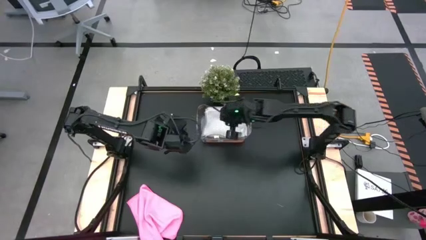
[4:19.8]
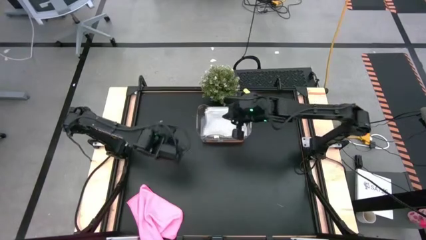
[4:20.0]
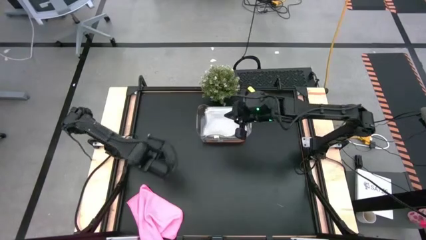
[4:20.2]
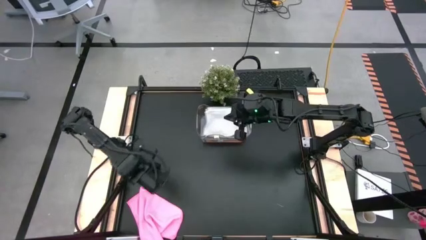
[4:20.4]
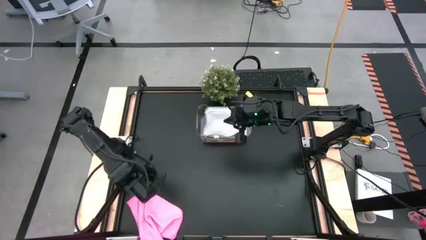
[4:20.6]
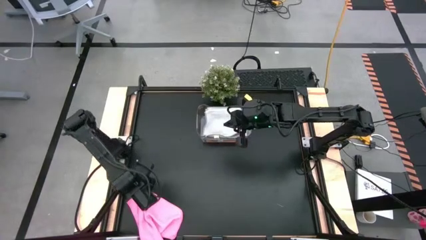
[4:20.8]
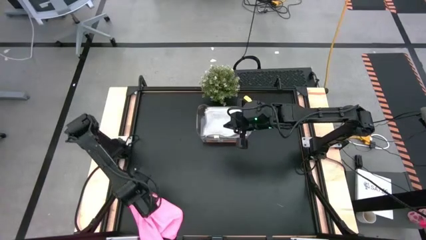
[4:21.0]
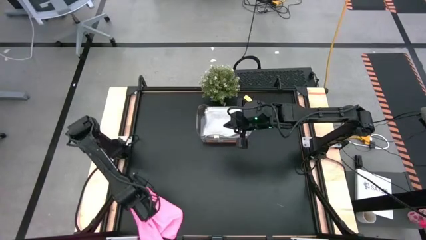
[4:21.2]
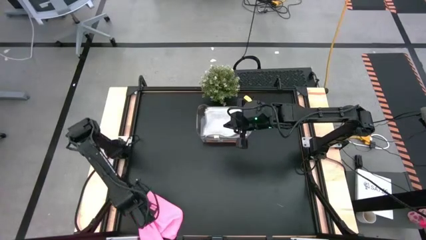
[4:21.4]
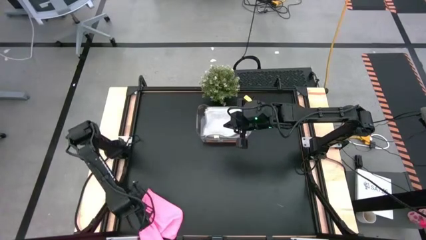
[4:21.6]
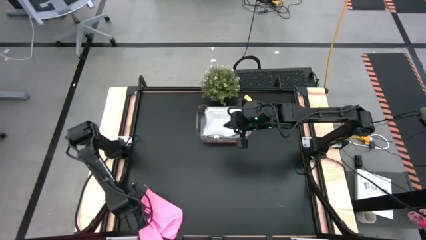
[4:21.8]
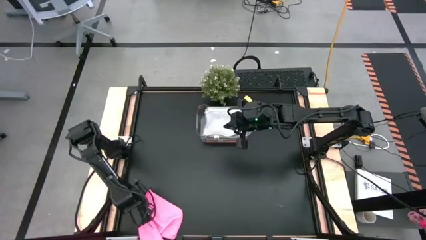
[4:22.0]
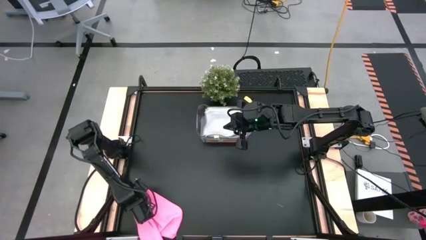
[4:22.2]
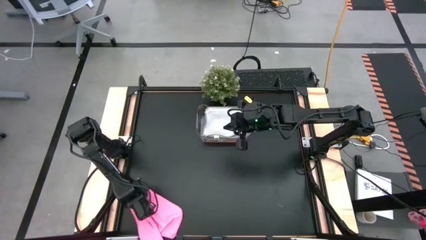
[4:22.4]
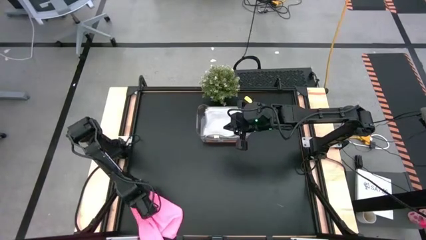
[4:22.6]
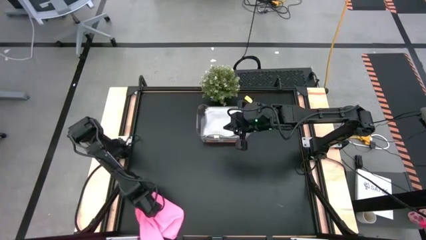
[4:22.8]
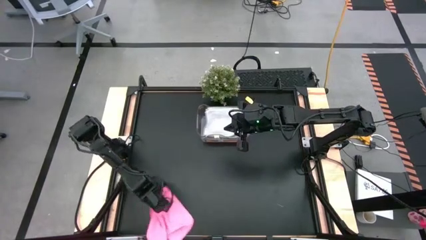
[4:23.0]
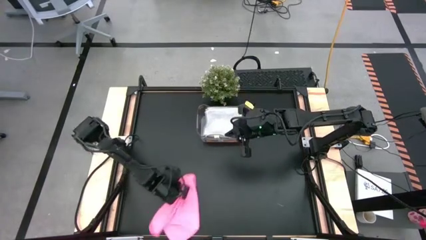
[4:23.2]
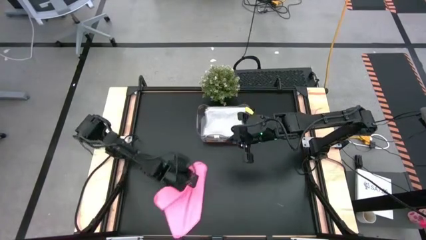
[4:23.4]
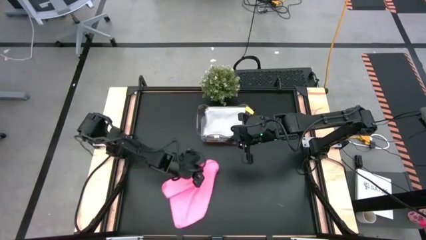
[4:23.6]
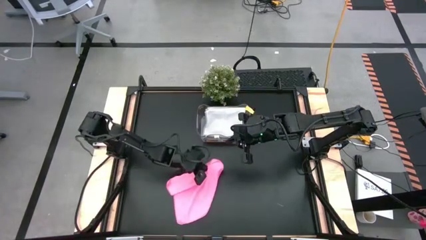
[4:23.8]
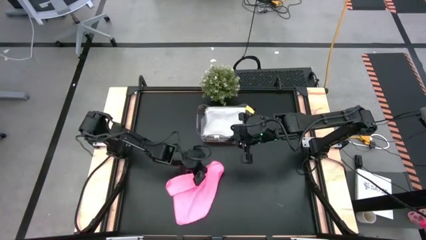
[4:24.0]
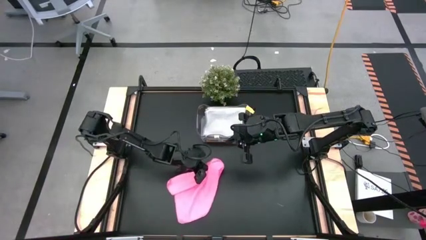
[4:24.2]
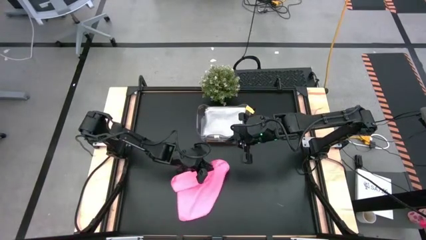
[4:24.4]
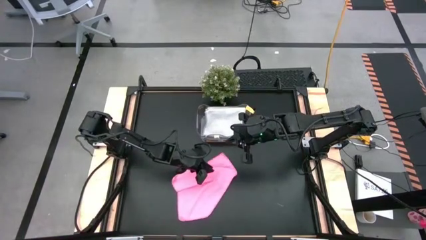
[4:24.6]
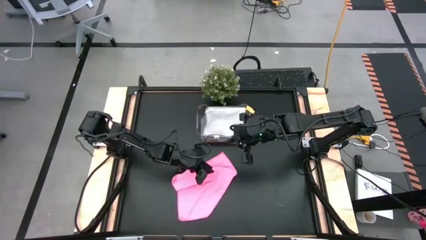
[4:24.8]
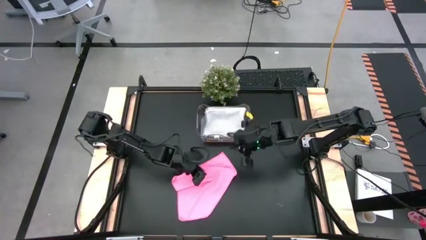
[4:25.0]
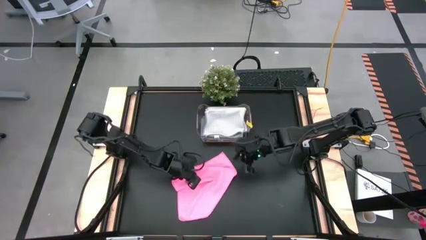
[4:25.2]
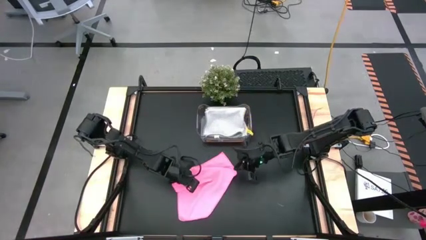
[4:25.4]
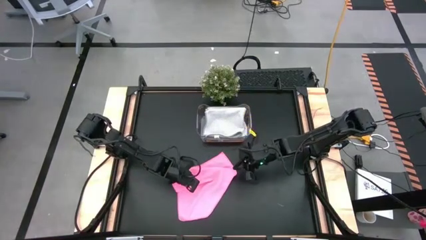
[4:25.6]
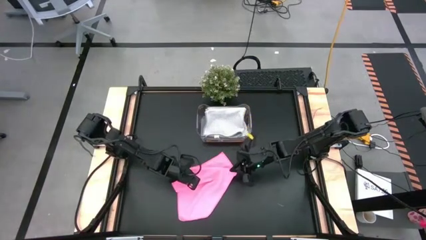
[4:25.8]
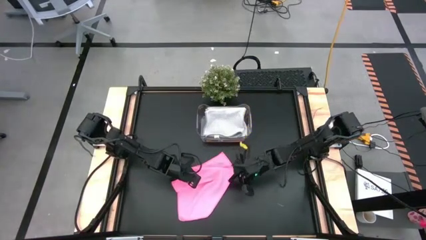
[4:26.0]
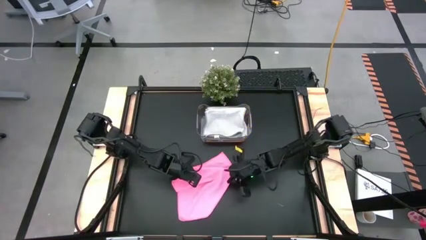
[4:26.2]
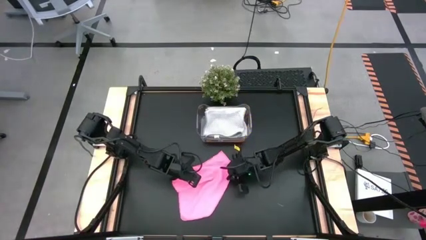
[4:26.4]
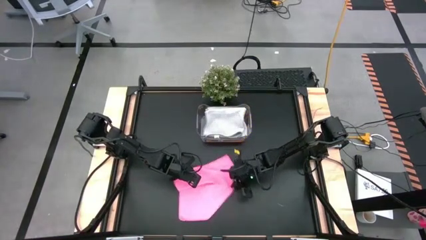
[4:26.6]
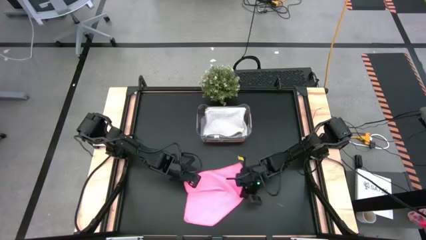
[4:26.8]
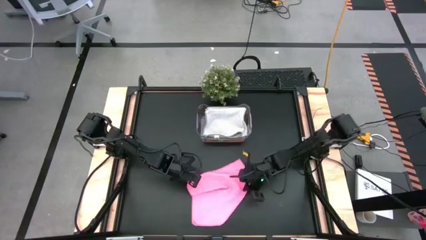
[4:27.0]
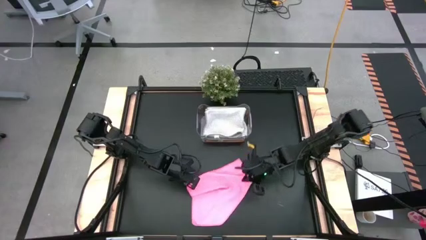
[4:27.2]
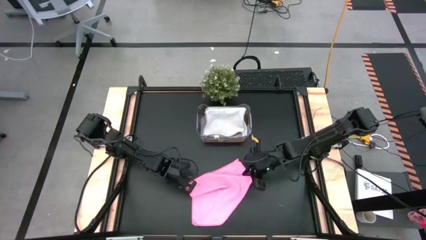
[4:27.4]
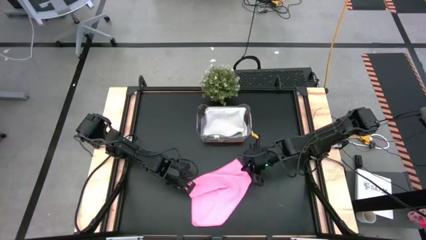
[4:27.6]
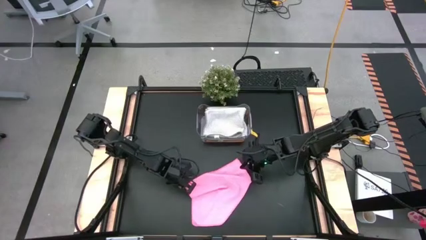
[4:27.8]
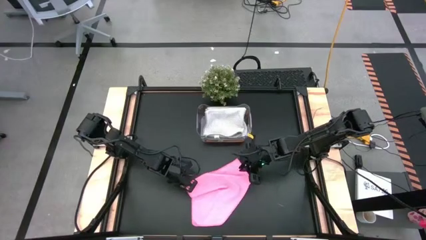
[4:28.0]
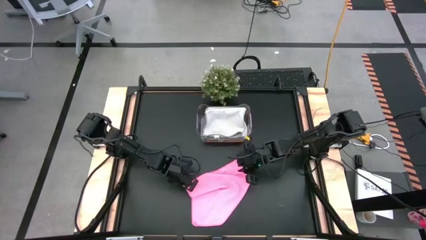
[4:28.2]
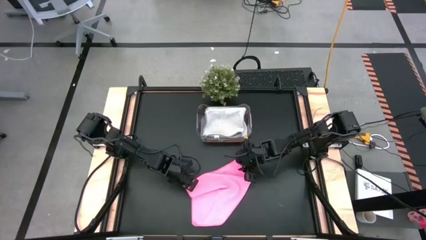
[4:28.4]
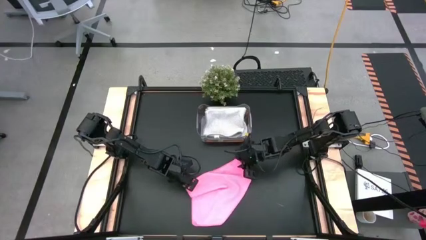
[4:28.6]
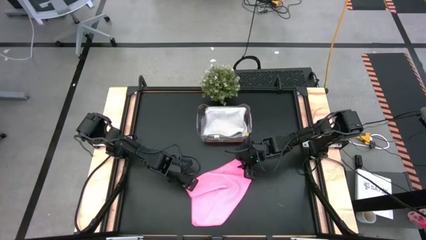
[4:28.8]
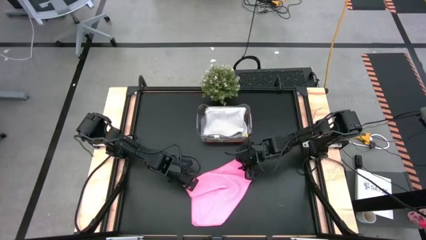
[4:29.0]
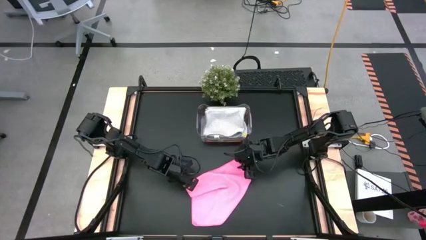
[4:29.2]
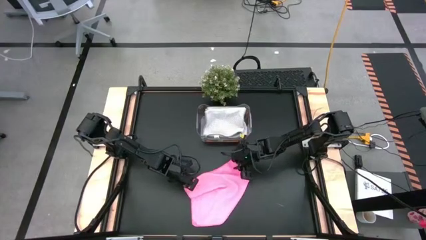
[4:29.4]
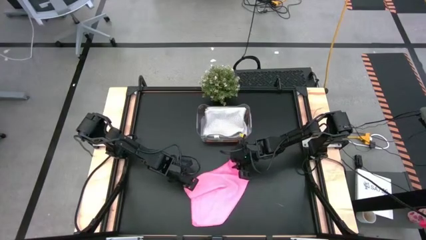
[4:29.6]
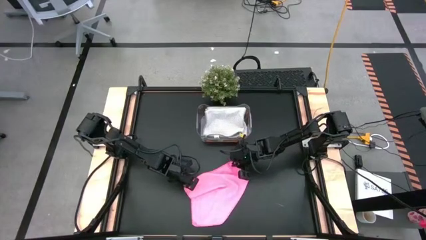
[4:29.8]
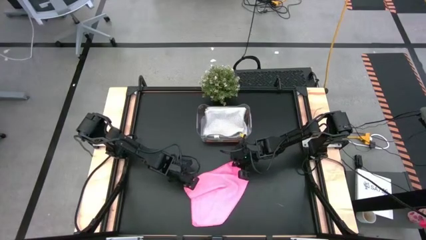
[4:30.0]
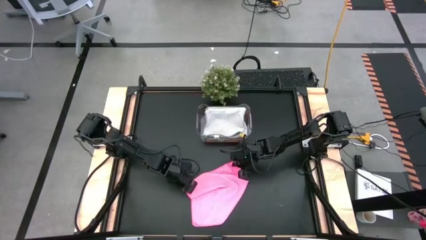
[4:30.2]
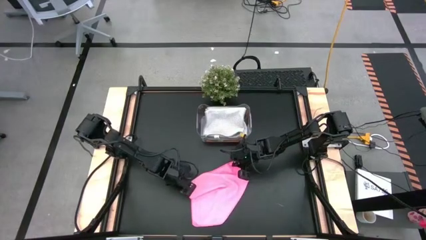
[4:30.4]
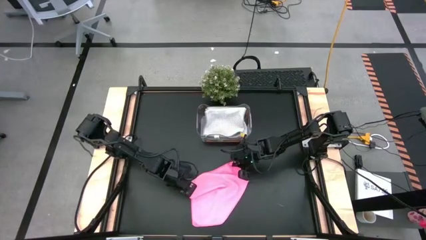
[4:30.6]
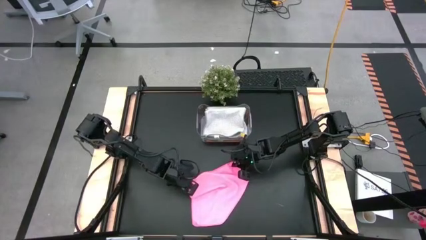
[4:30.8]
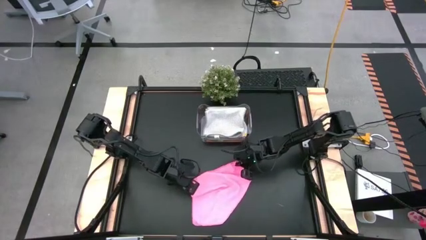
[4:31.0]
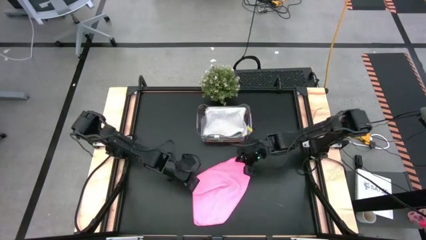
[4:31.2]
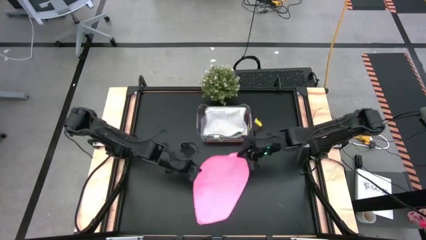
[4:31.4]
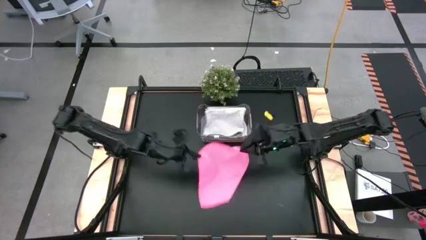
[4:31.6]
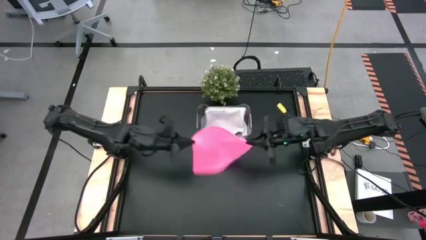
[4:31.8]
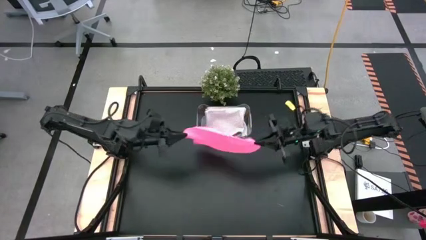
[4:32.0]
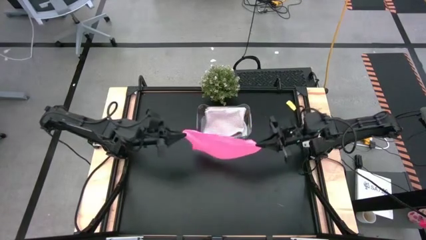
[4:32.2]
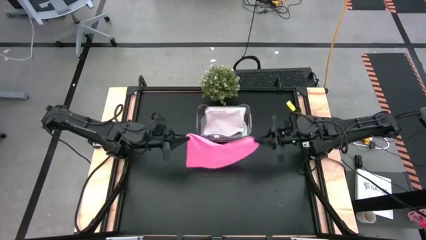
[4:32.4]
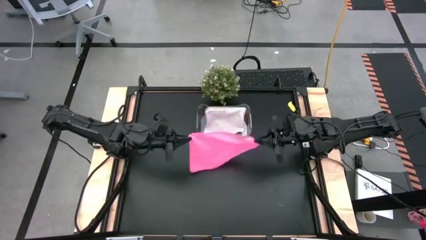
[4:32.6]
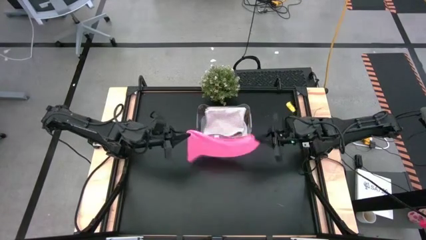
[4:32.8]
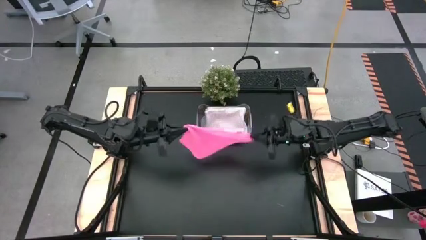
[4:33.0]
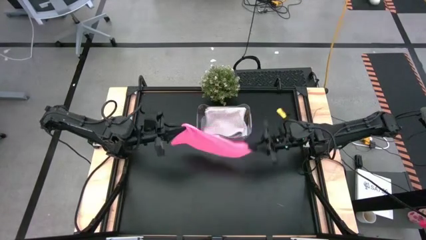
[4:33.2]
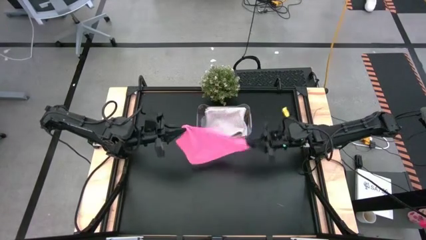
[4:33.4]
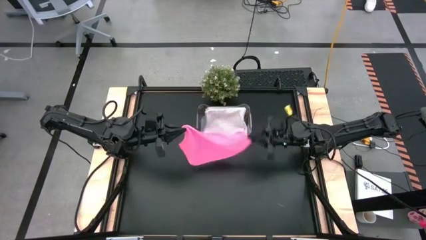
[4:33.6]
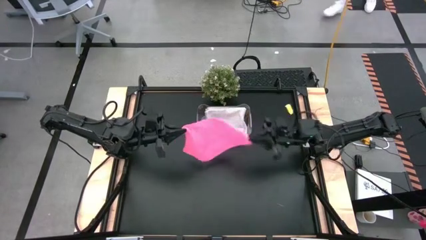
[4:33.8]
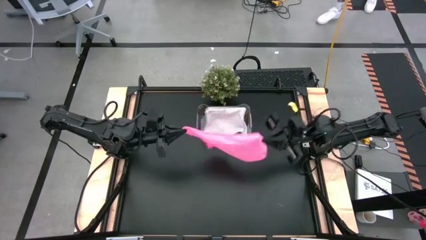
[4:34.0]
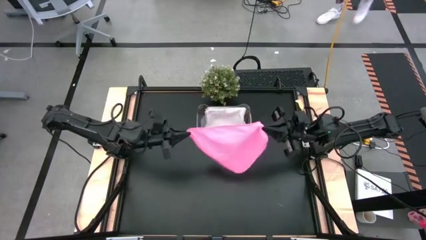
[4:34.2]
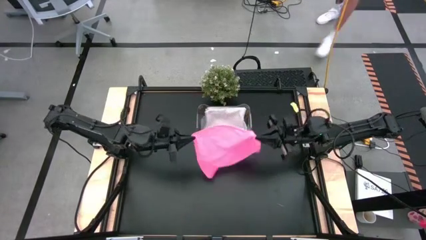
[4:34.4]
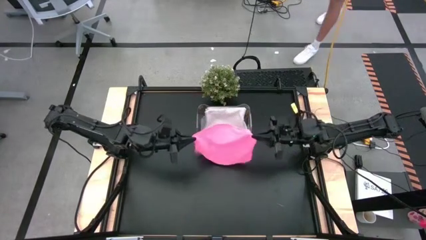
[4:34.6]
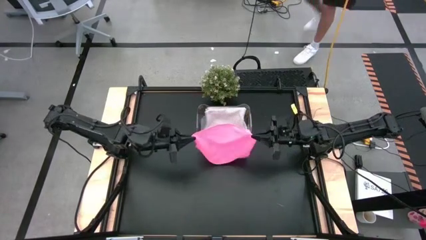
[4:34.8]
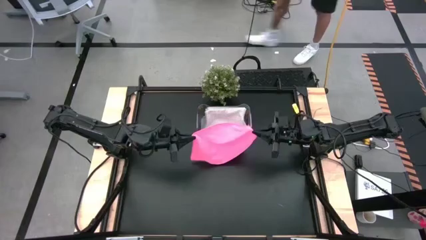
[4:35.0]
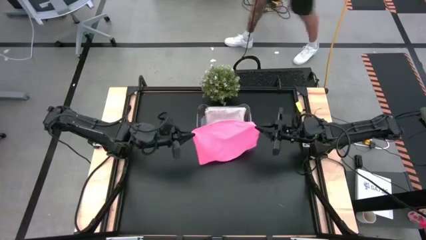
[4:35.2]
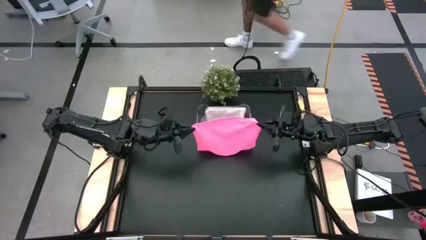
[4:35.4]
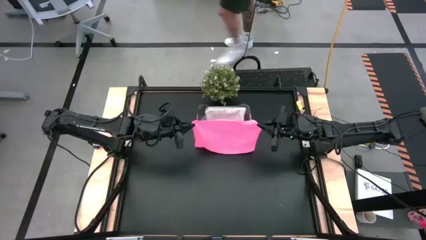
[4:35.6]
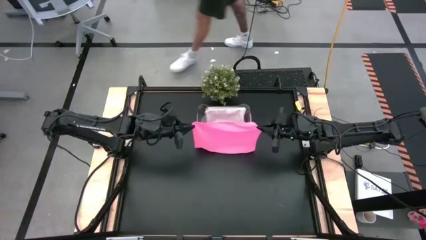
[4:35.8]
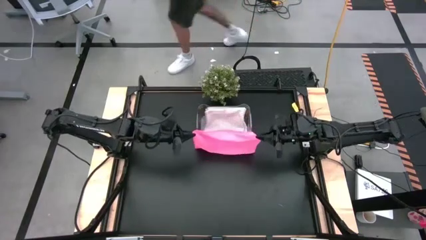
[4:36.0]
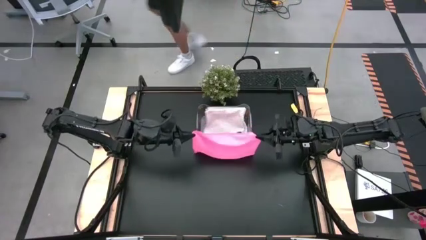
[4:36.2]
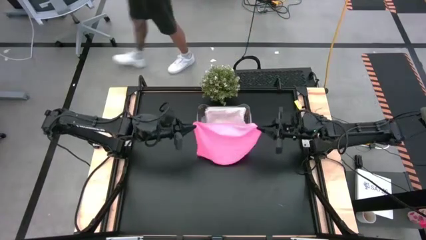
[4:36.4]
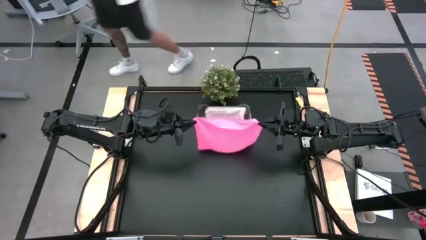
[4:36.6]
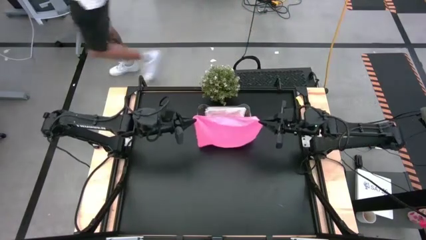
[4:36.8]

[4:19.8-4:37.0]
Task: Fold microfiber towels
Fold the pink microfiber towel
